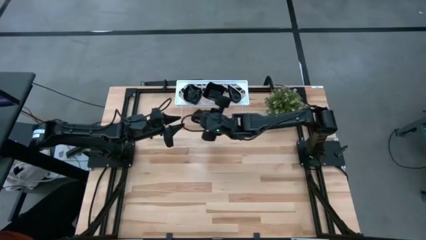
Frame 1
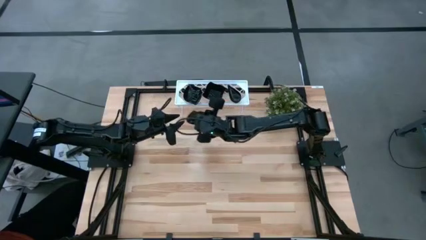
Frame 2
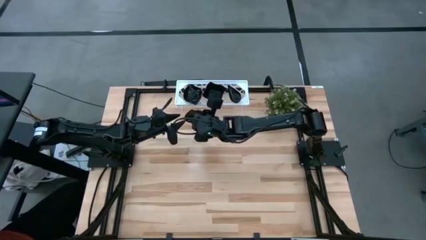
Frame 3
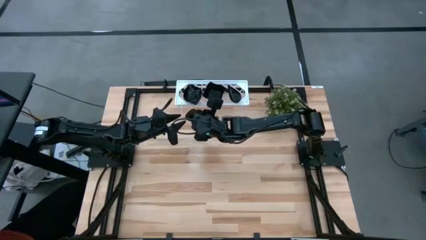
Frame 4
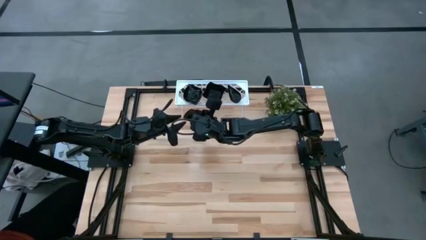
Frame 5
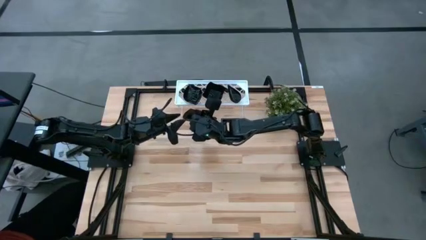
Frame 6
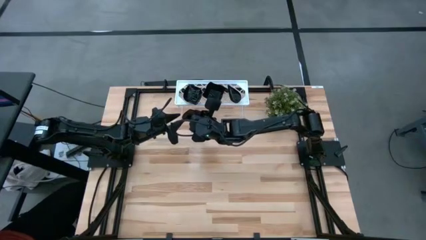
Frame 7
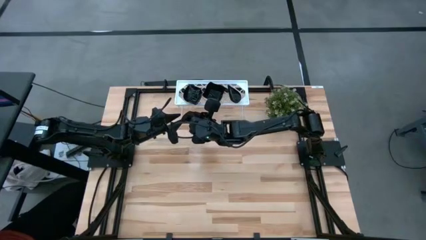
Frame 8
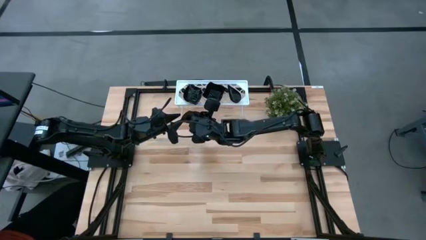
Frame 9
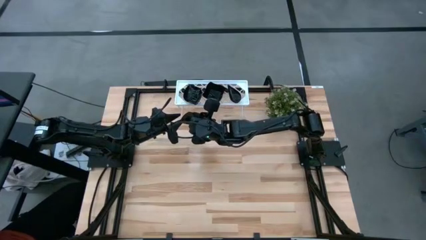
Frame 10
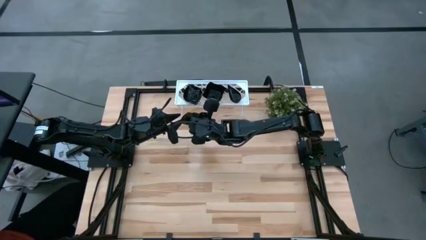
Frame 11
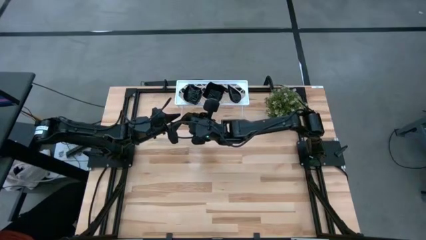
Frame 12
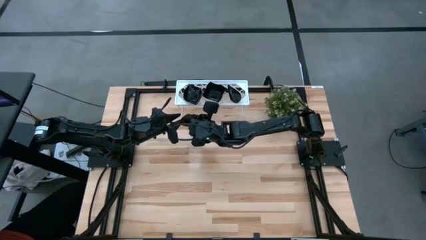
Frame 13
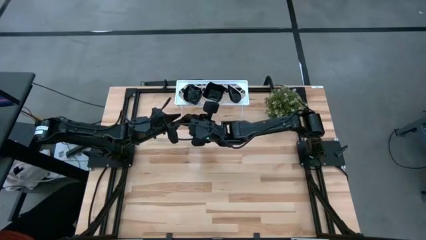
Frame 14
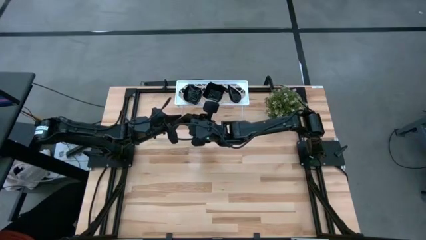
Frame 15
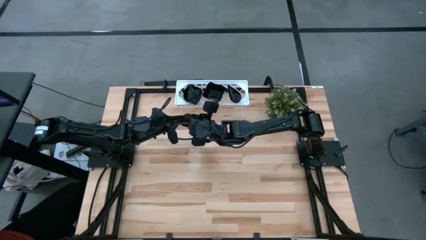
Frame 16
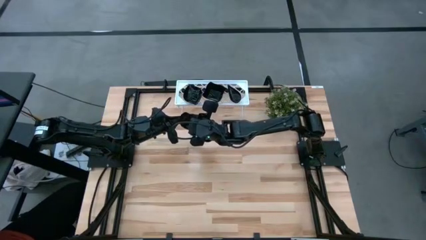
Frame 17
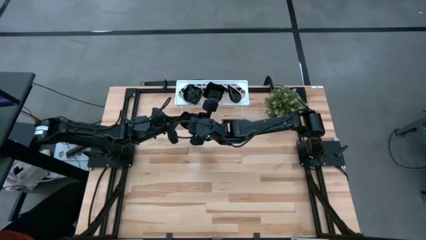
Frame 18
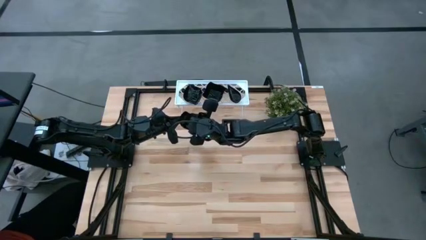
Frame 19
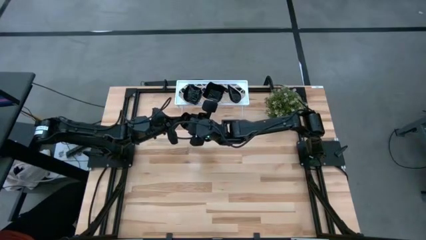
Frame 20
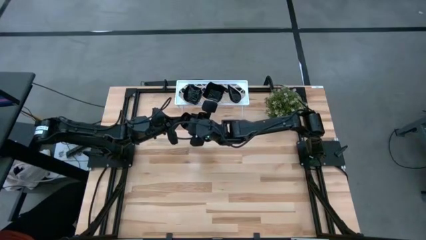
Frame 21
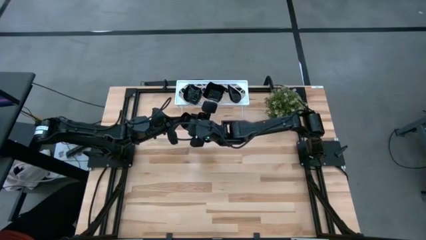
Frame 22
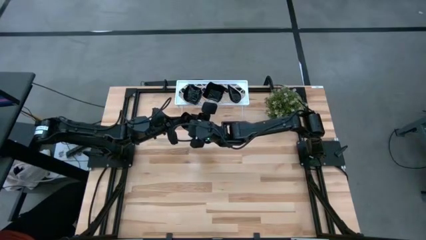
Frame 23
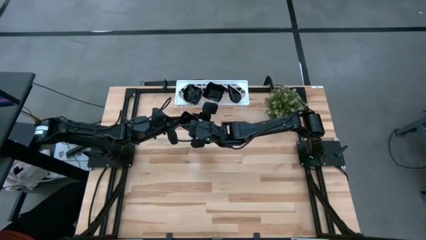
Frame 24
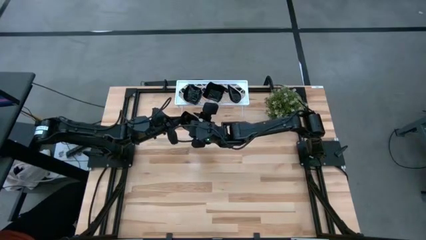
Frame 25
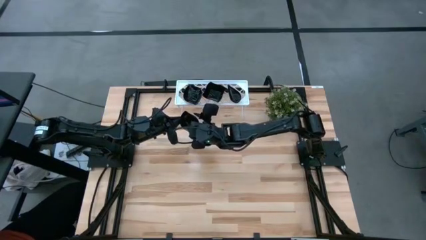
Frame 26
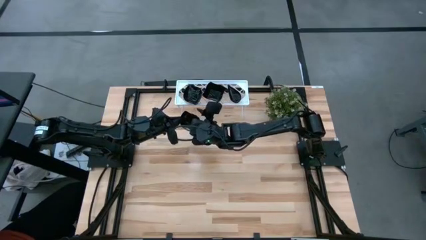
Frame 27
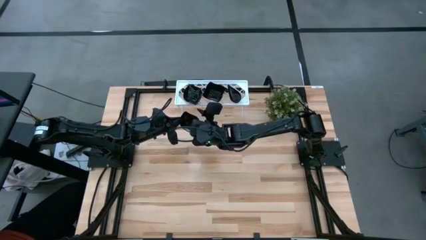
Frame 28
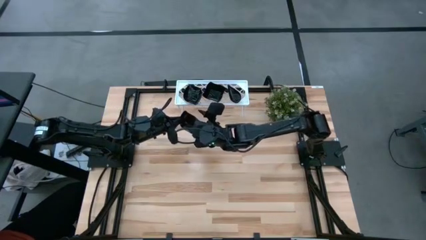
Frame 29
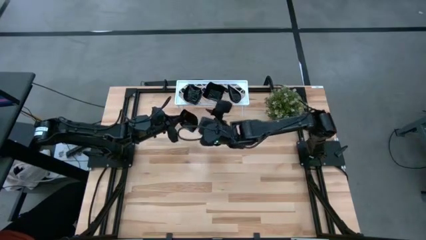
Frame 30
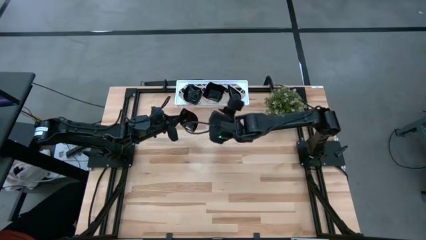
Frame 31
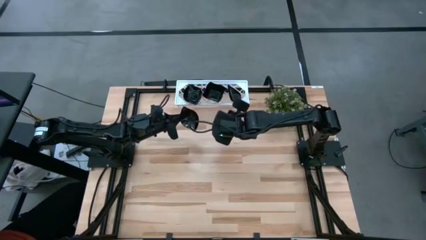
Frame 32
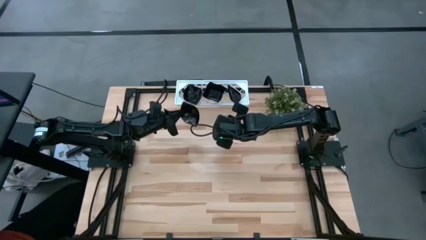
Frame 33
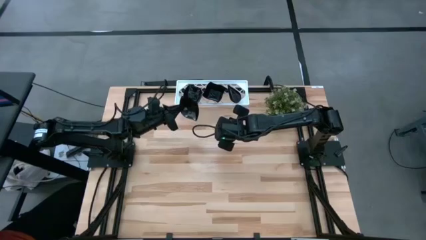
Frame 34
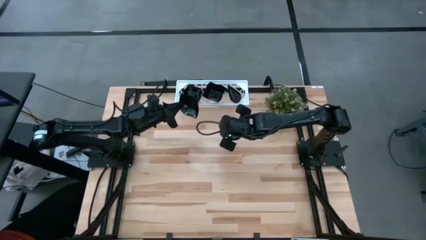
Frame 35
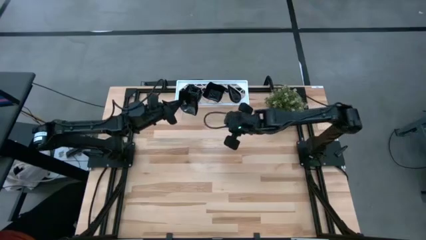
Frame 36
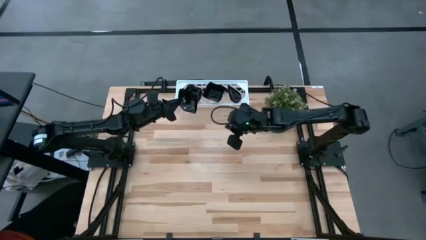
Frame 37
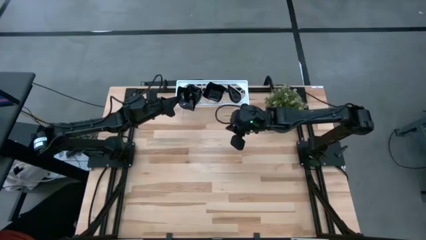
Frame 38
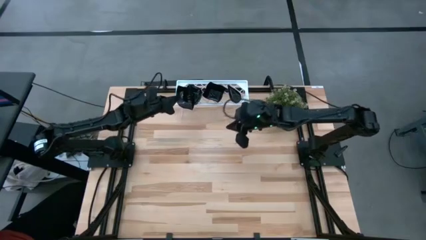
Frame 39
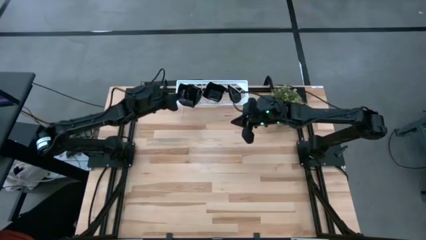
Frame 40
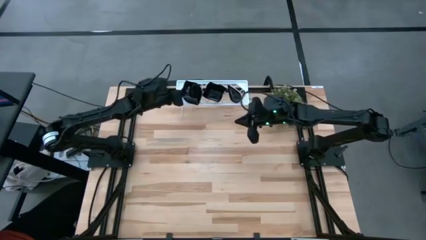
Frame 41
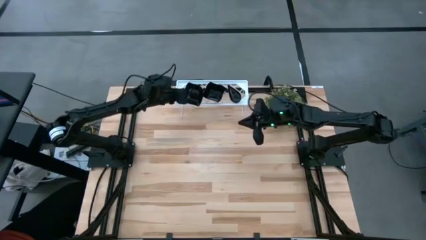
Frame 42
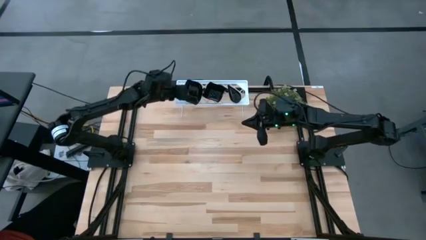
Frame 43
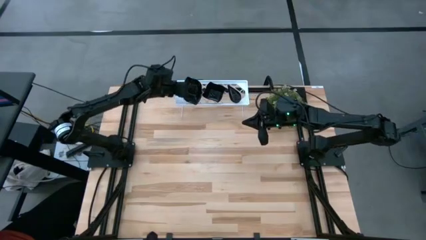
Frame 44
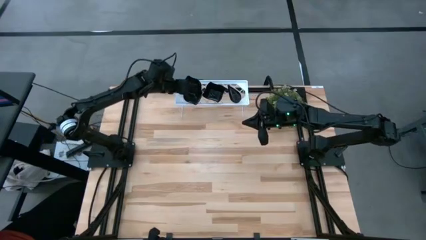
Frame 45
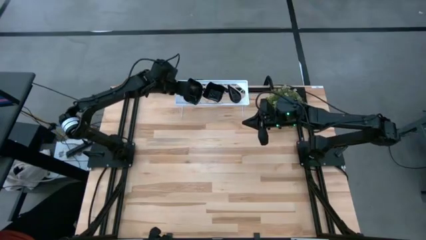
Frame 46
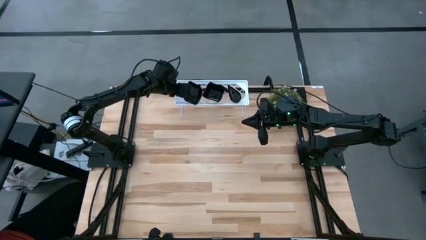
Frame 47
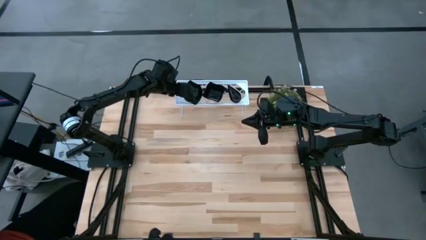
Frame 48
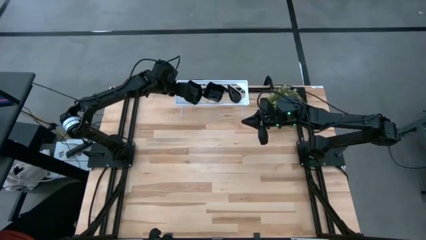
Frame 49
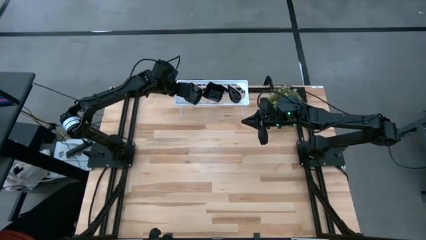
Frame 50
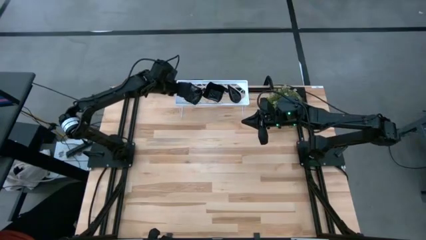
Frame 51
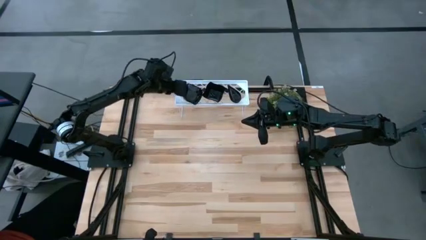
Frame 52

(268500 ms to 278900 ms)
Task: Pick & Place Mini shaped plates
Stack the leaf-shaped plate on top of the other leaf-shaped plates on the shelf

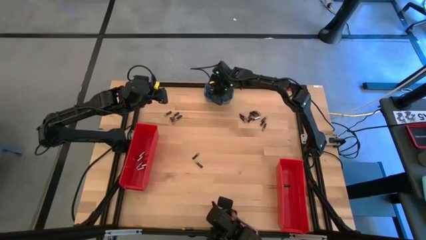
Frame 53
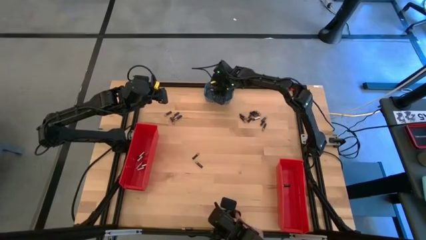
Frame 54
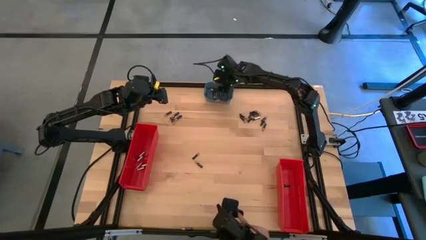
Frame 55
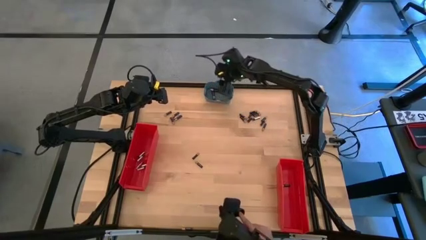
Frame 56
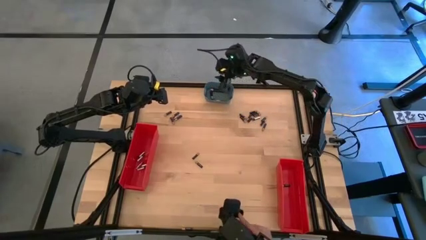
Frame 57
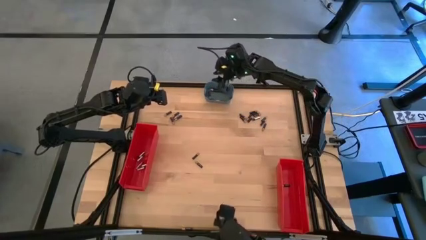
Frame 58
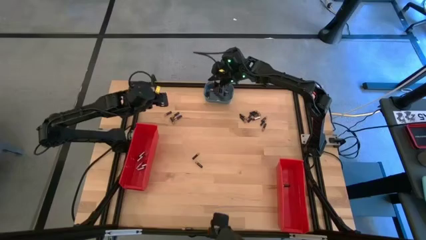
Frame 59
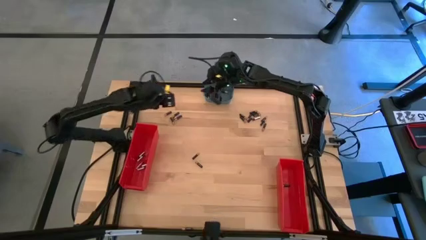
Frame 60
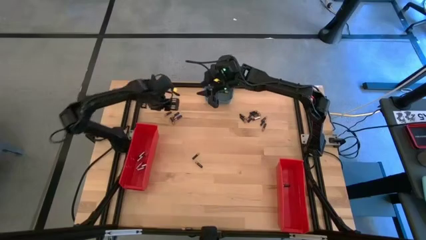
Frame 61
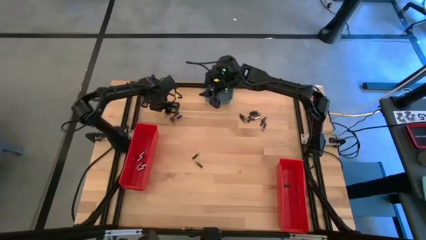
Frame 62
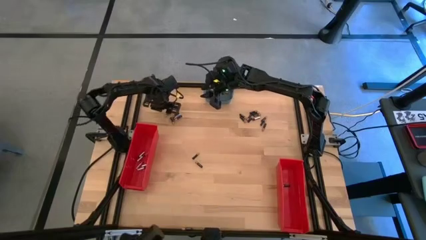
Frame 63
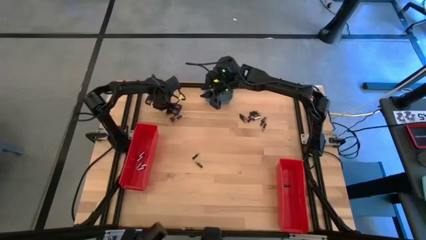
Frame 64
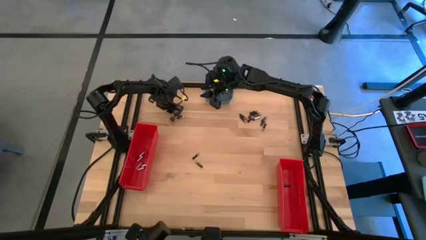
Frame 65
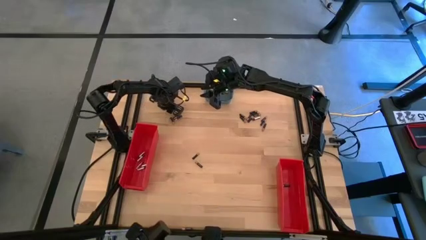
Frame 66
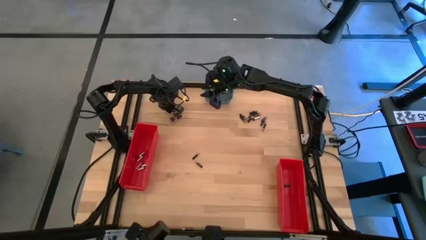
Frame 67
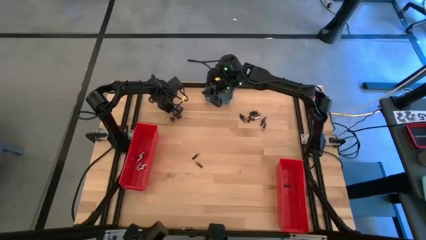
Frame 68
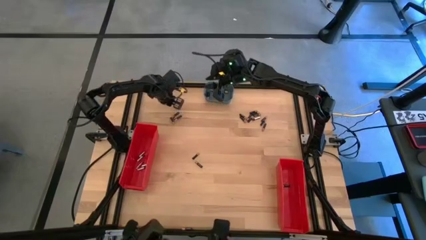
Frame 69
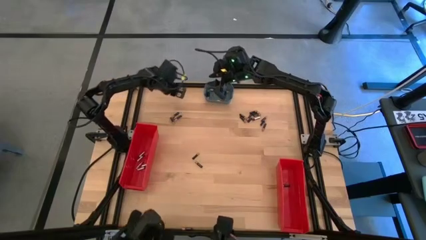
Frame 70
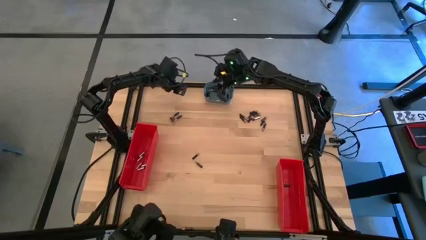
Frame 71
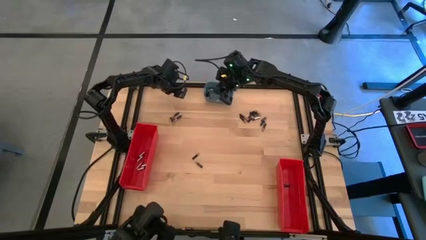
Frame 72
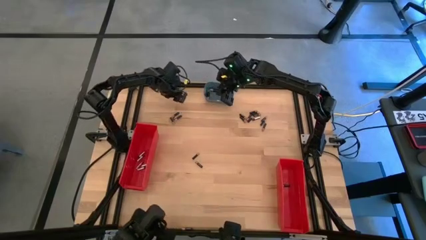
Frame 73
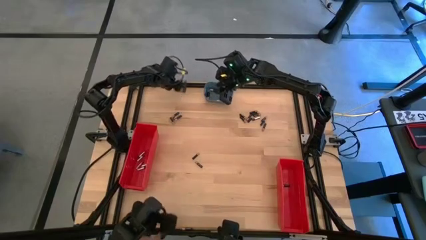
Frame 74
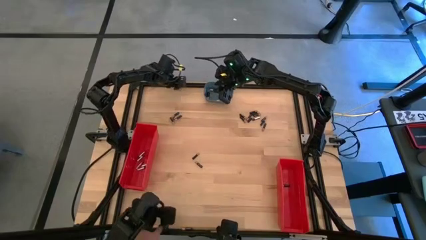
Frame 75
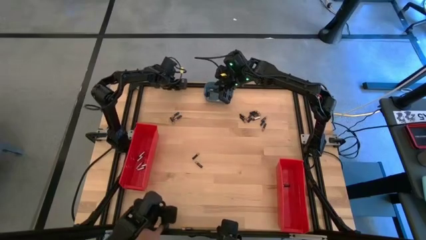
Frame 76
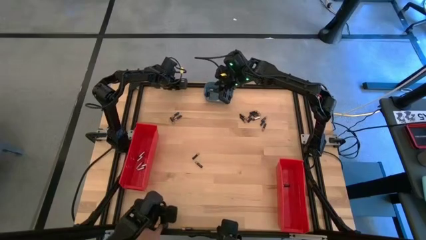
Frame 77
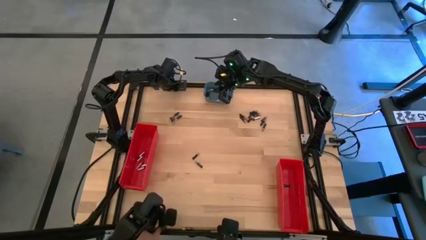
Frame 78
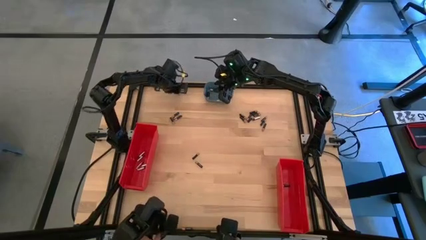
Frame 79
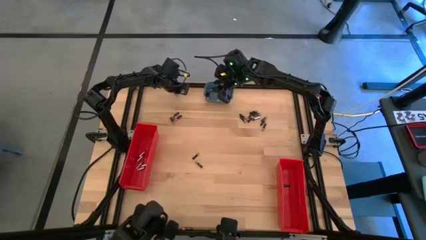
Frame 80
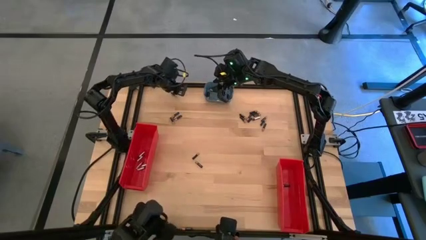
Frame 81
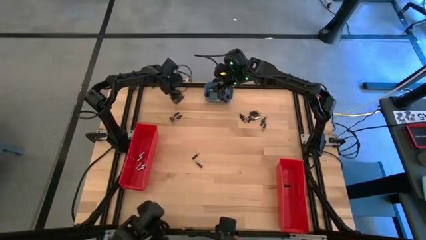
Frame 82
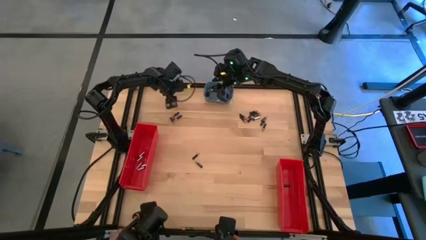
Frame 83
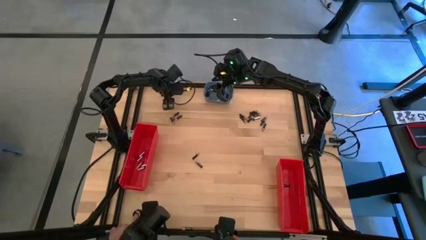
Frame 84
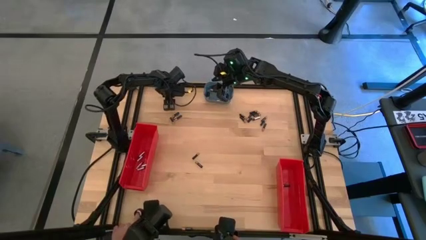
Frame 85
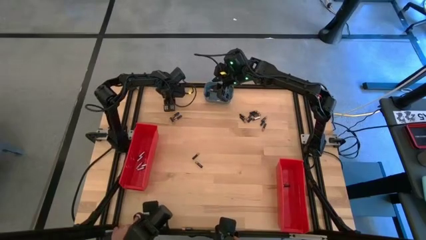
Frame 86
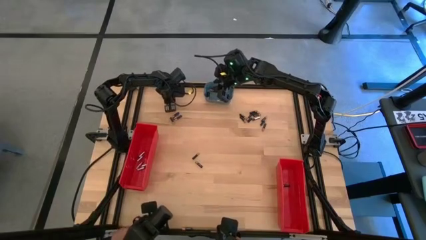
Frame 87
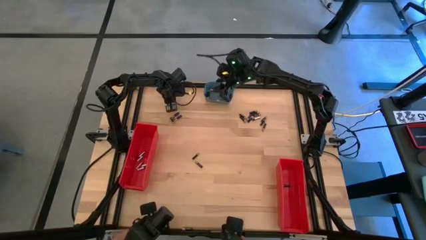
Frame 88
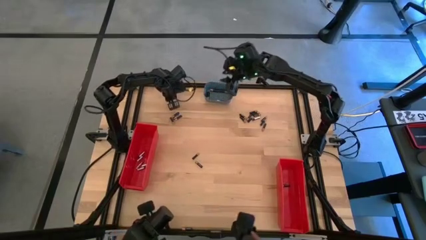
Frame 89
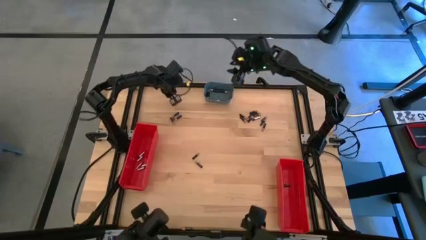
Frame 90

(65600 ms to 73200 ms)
Task: Sort batteries
Put the small brown battery into the right red bin
